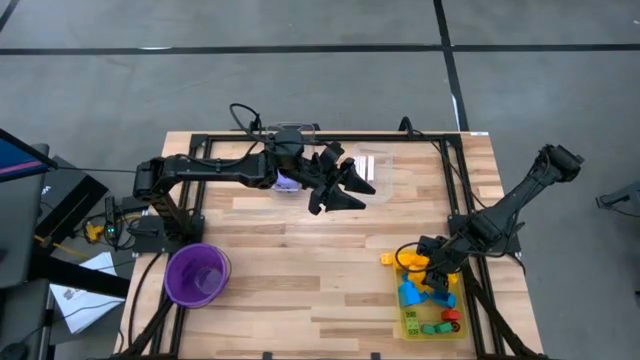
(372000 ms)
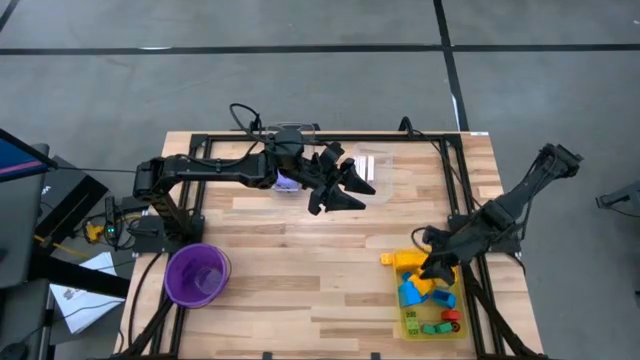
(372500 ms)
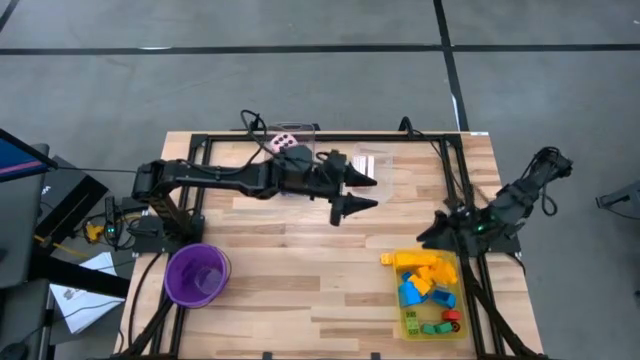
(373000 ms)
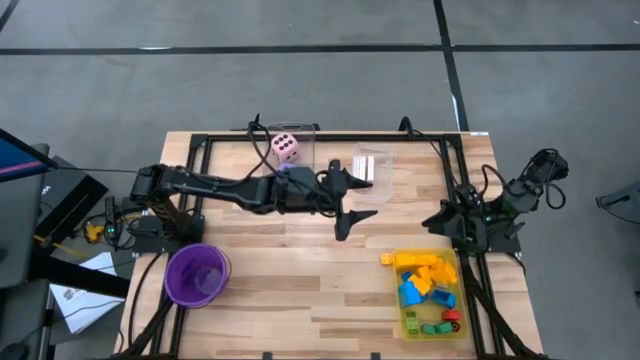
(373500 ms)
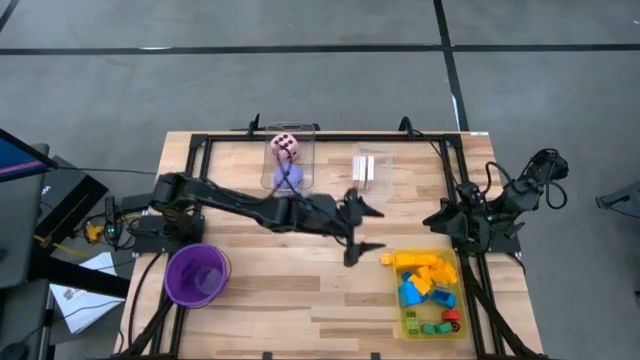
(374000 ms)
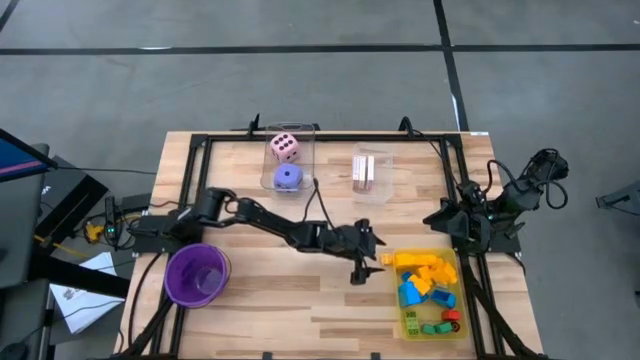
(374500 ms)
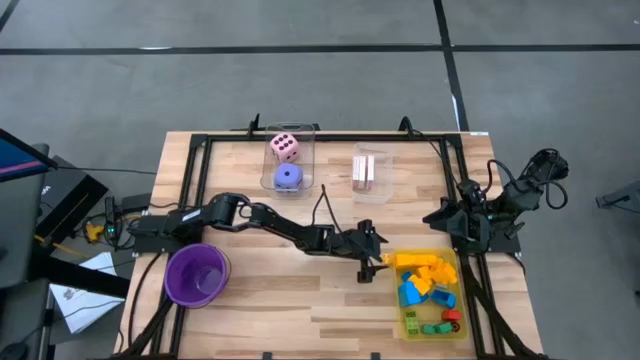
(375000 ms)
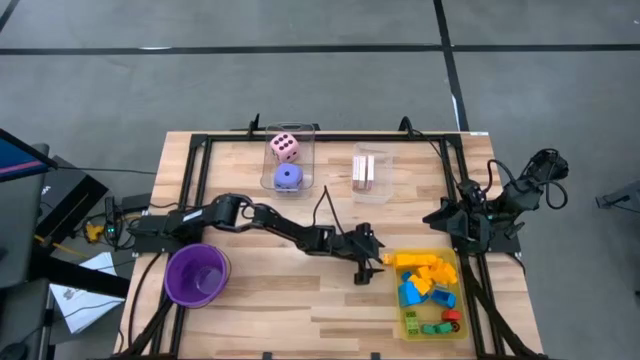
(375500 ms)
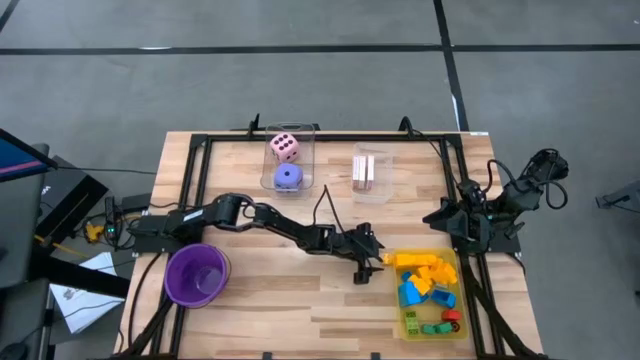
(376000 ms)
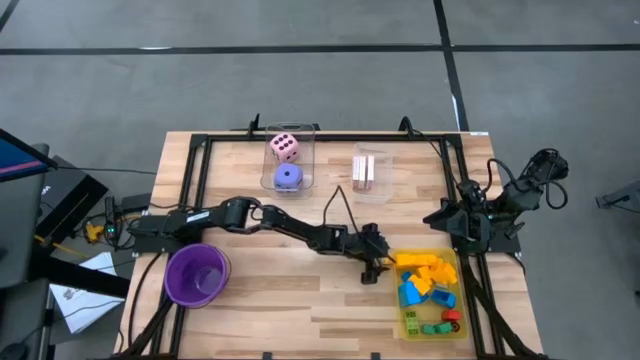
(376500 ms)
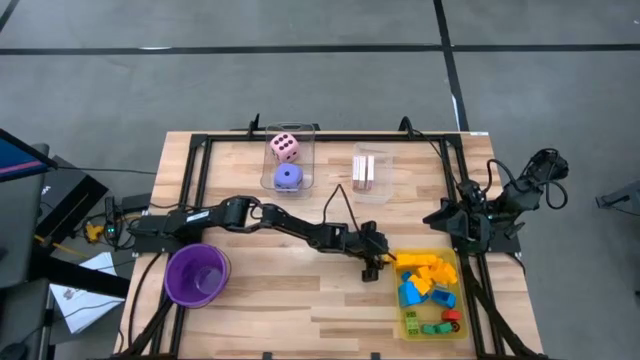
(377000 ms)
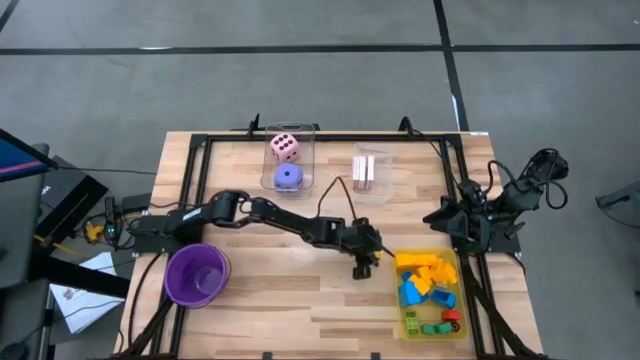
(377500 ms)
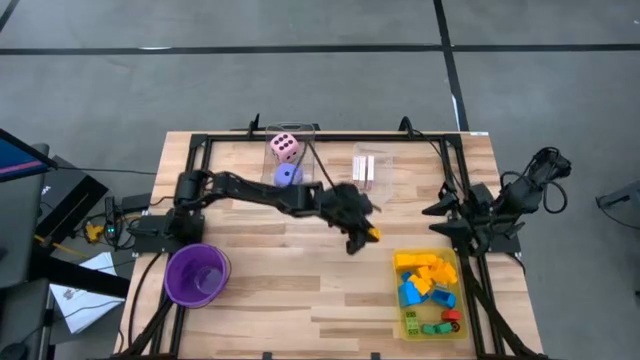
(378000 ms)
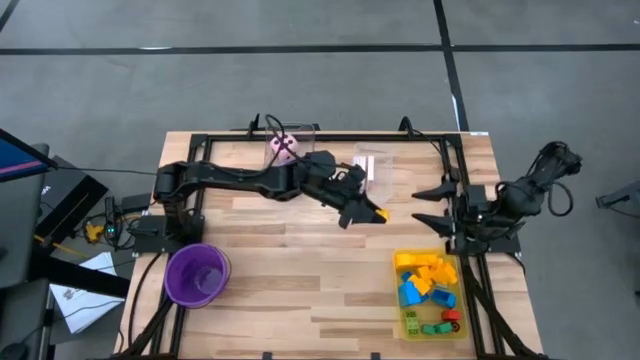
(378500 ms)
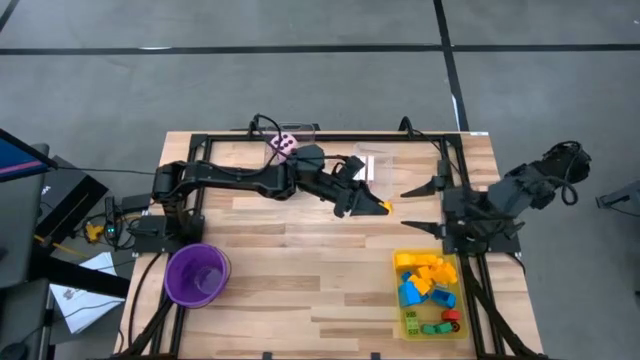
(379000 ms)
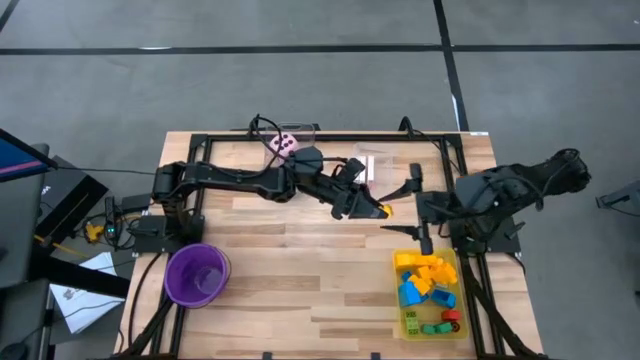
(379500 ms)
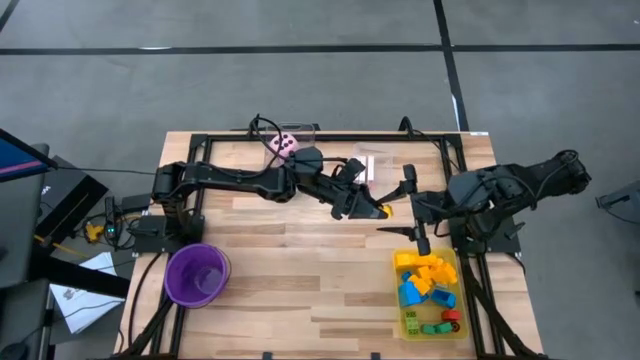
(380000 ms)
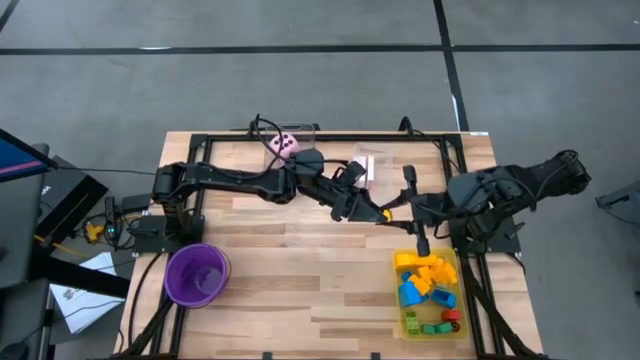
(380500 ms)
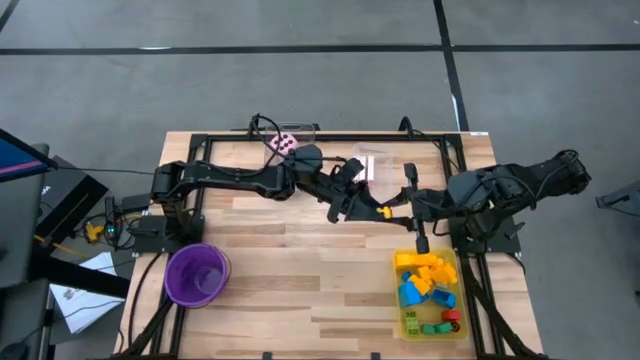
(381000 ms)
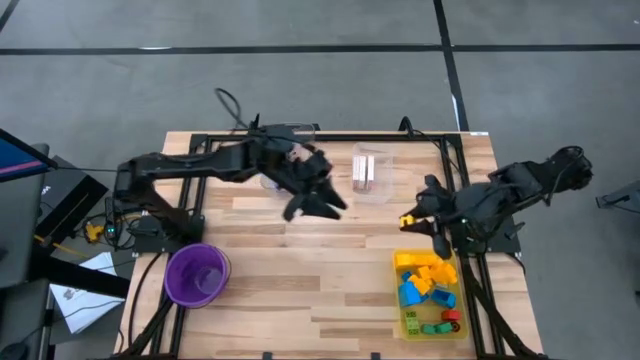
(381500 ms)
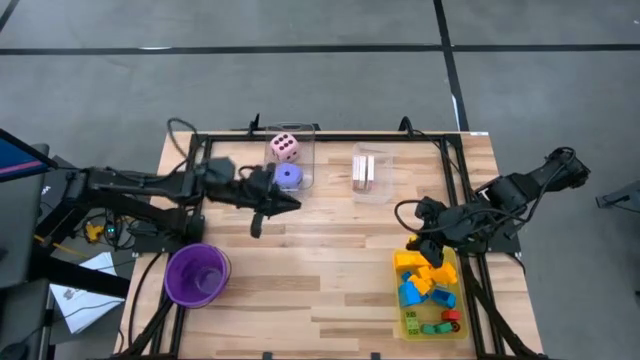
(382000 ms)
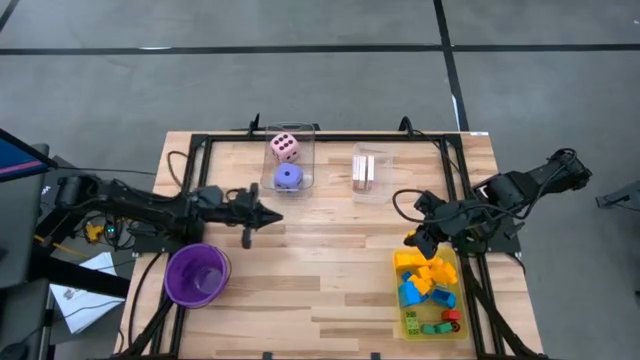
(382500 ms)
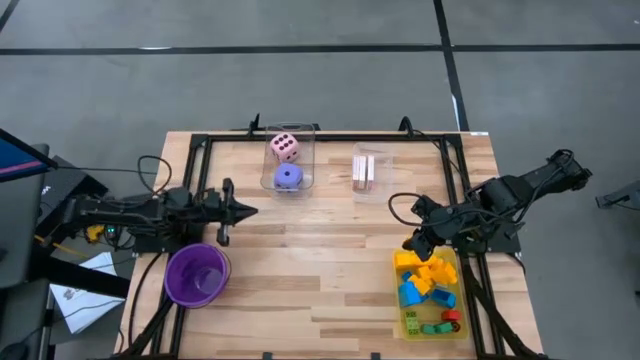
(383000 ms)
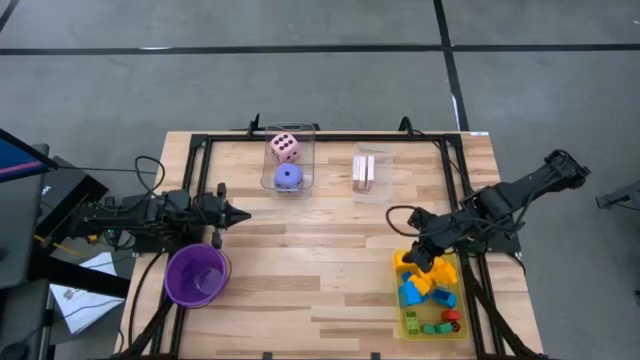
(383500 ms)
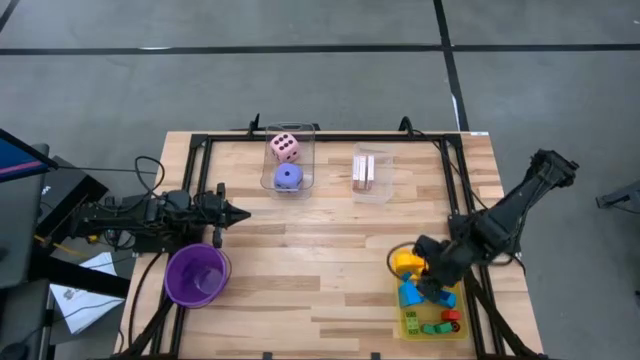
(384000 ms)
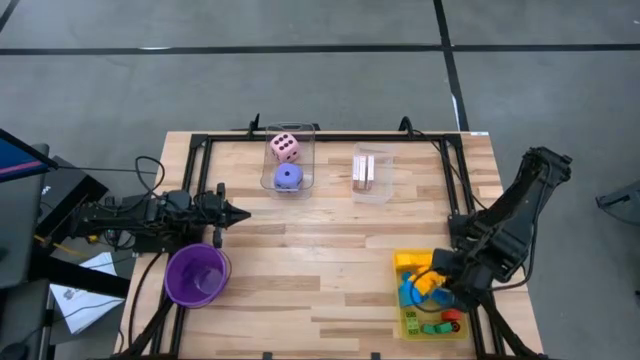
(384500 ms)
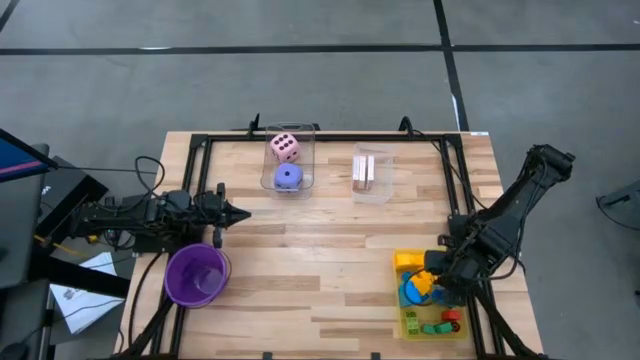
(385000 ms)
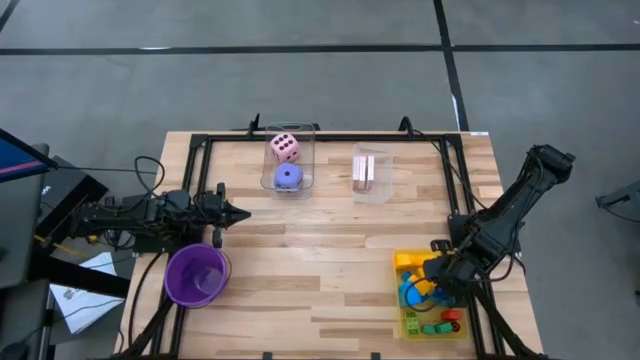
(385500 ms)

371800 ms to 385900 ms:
Task: Pick & Place Toys
Put the yellow game piece into the bin

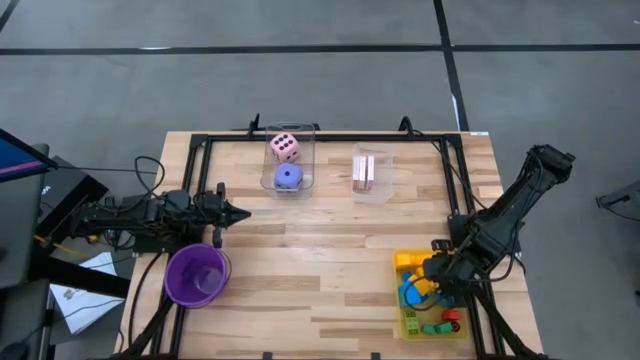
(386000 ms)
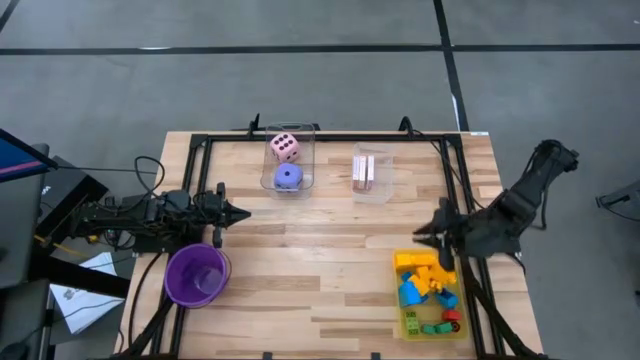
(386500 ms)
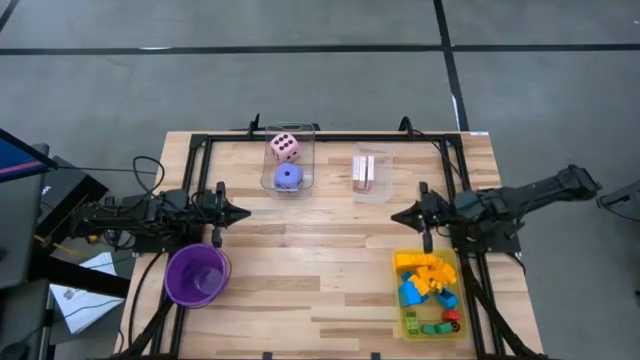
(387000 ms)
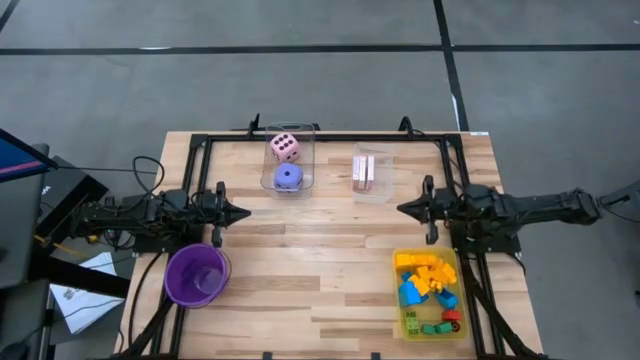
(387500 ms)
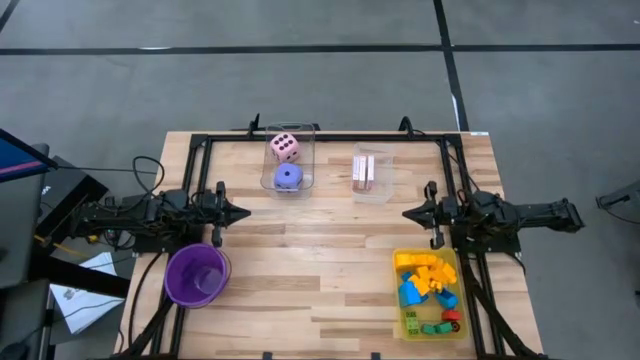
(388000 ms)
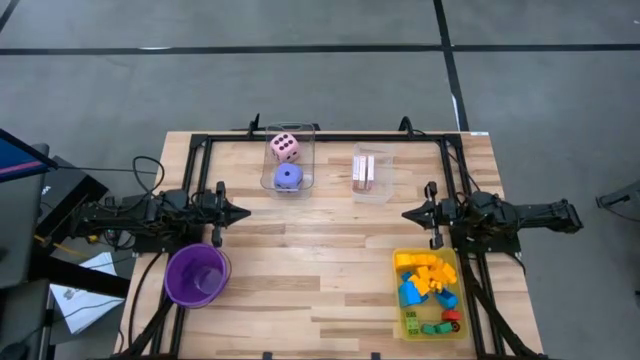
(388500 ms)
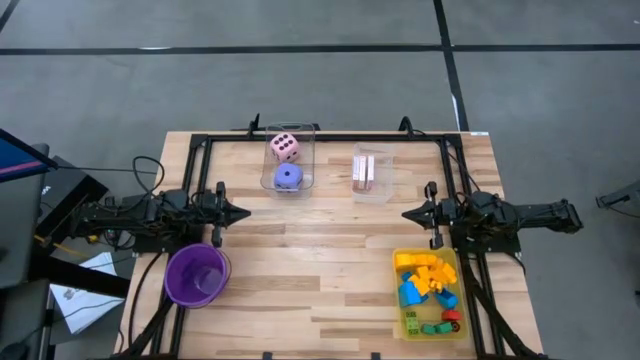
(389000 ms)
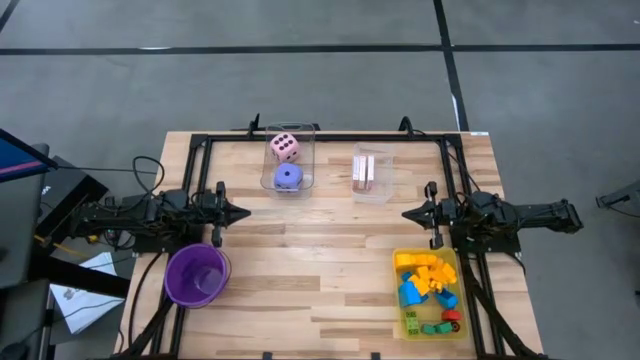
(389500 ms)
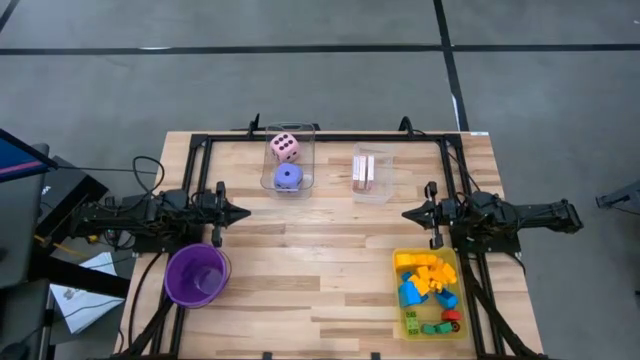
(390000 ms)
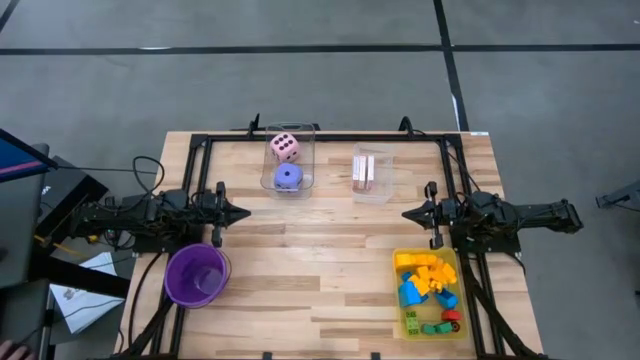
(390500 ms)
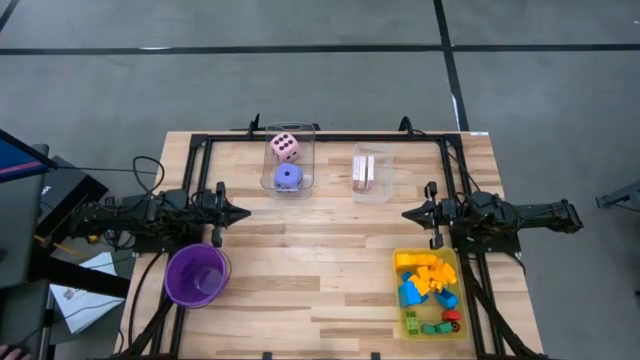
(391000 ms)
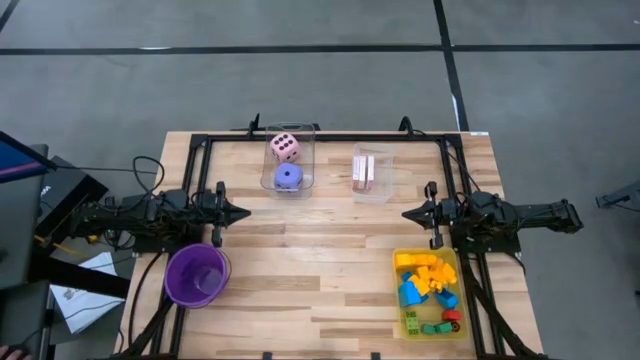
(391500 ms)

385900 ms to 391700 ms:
Return to Home Position

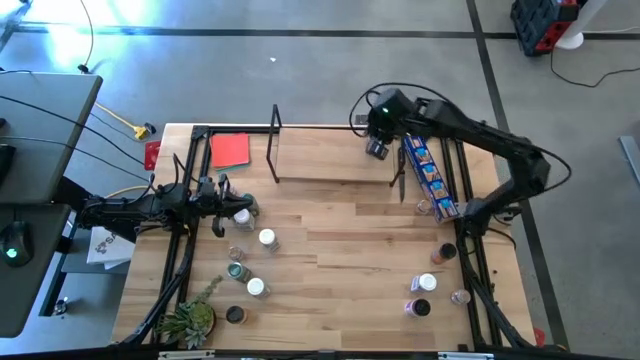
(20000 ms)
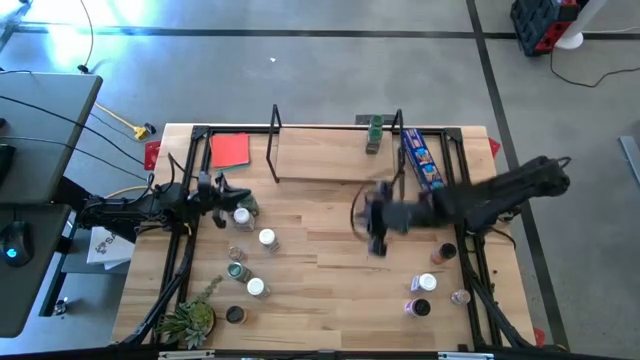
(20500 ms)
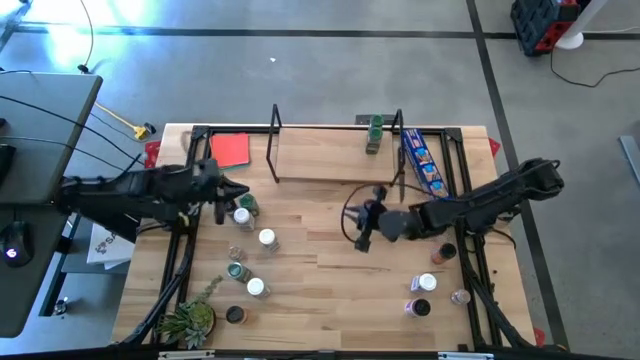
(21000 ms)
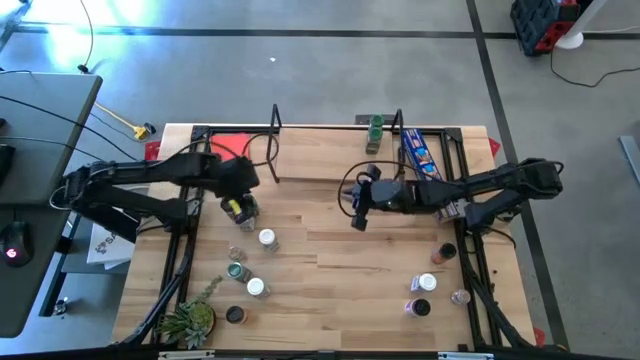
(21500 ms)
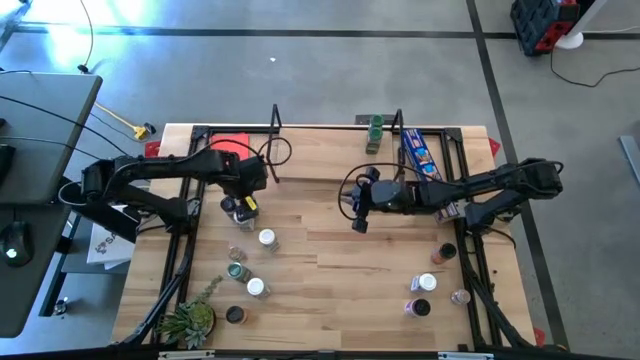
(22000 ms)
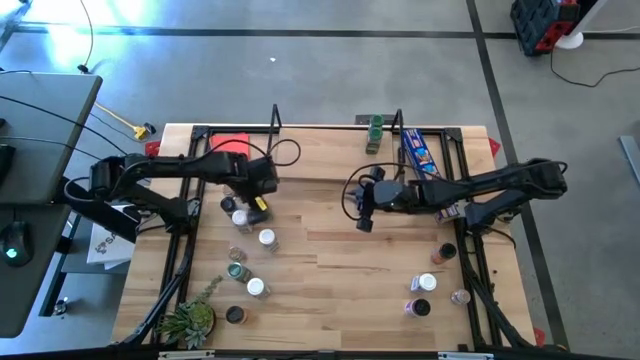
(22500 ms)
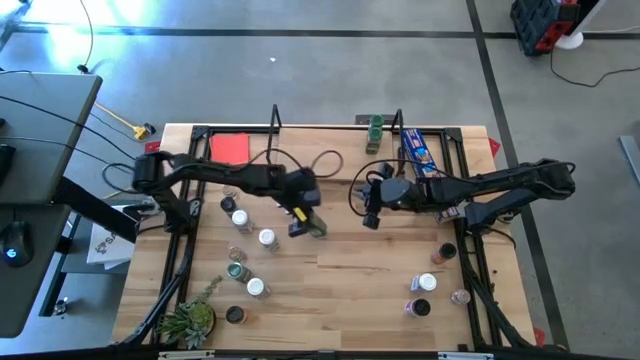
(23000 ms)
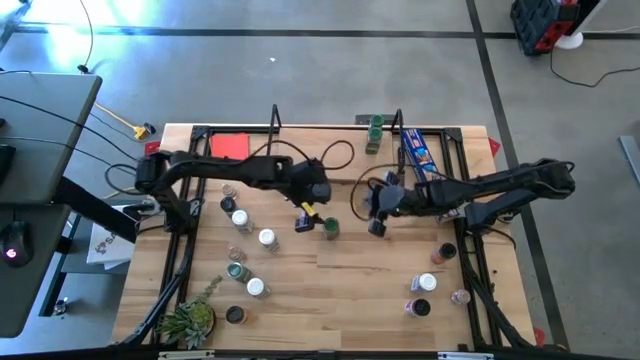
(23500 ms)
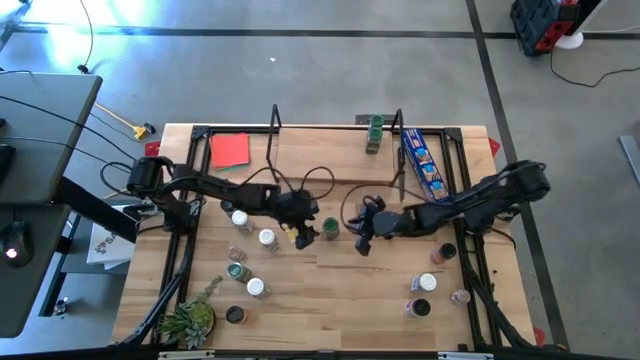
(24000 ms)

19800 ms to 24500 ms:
Task: Shelf spices
Put the top green seasoning bottle on the shelf aligned with the other green seasoning bottles
